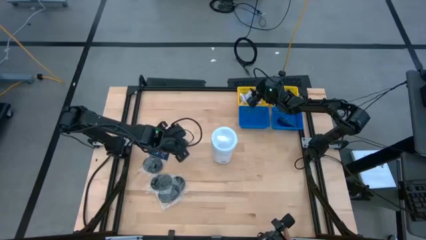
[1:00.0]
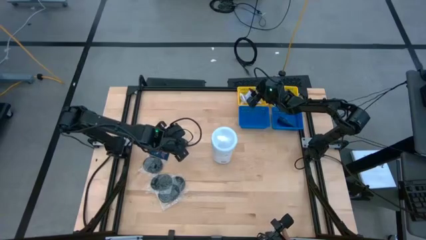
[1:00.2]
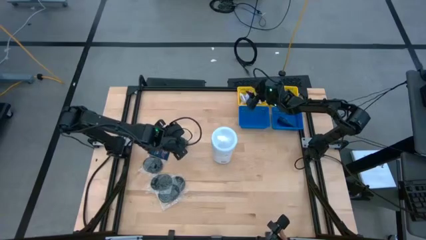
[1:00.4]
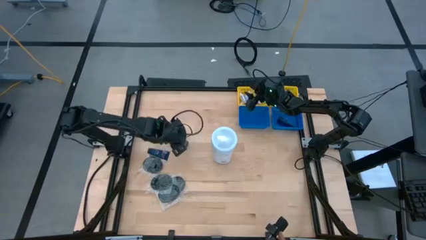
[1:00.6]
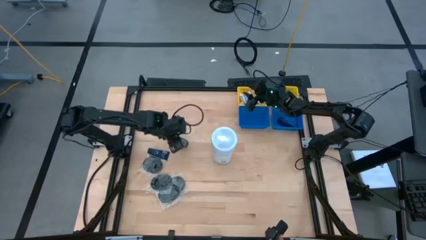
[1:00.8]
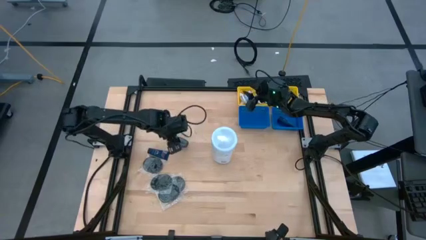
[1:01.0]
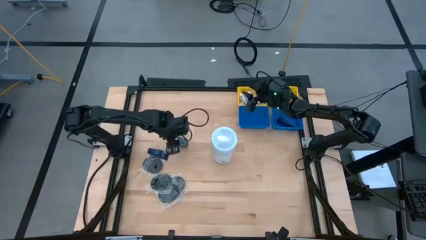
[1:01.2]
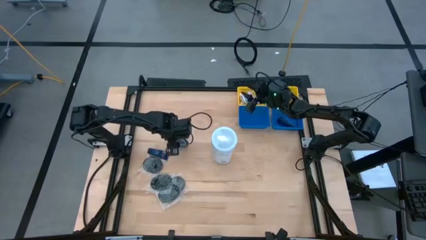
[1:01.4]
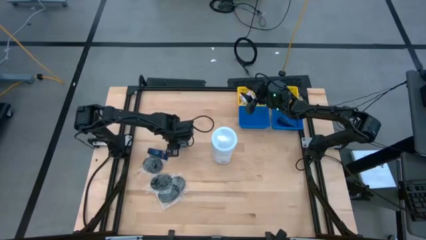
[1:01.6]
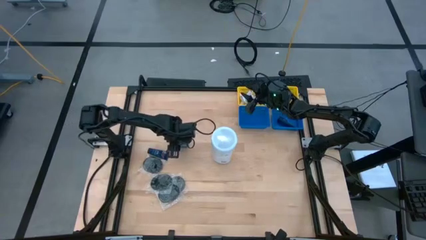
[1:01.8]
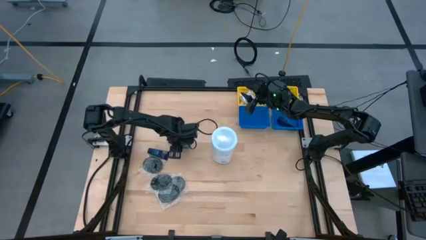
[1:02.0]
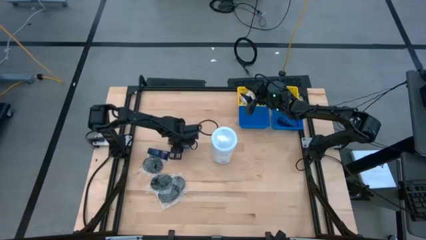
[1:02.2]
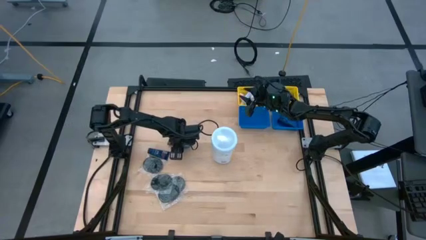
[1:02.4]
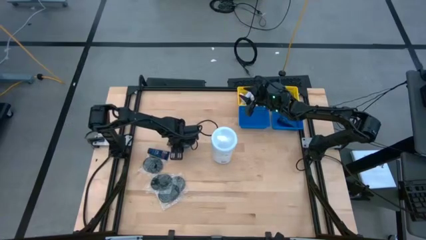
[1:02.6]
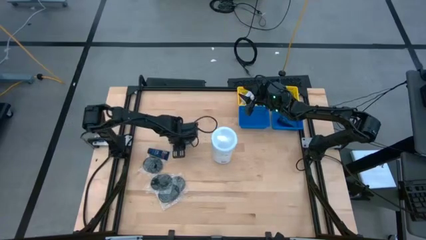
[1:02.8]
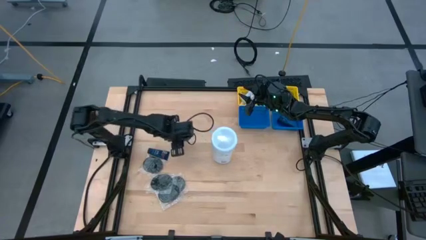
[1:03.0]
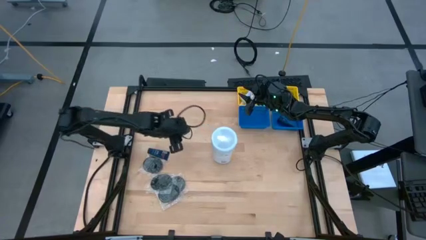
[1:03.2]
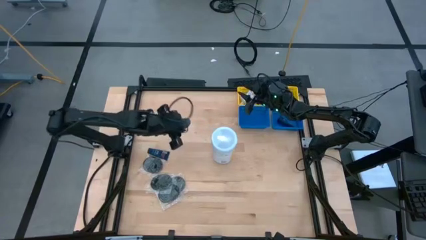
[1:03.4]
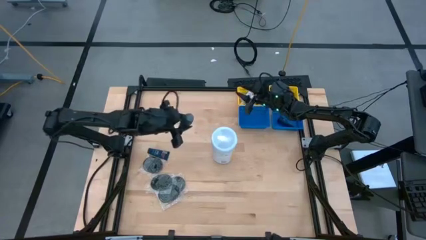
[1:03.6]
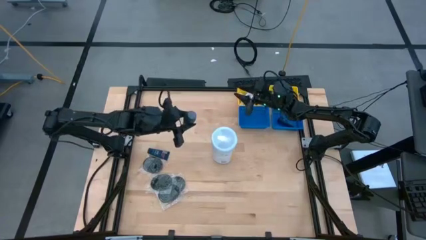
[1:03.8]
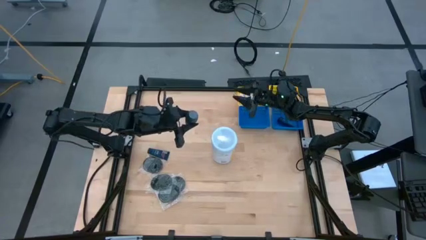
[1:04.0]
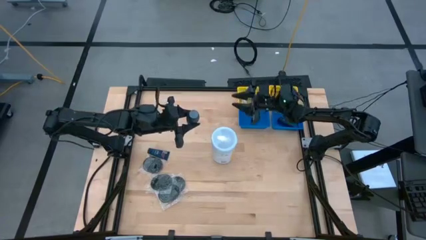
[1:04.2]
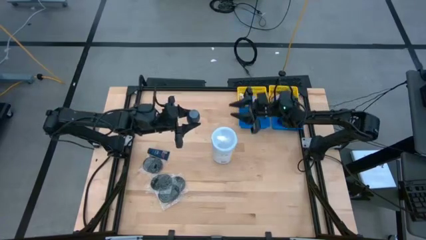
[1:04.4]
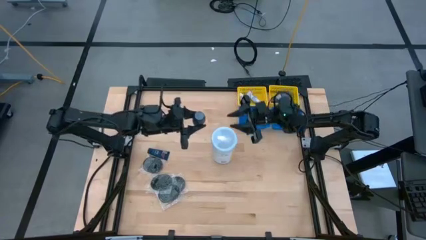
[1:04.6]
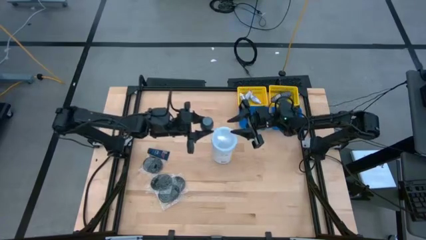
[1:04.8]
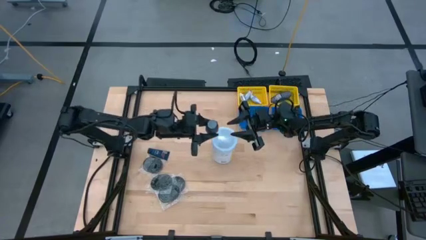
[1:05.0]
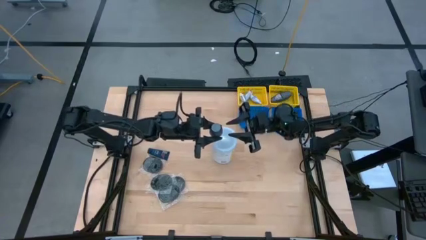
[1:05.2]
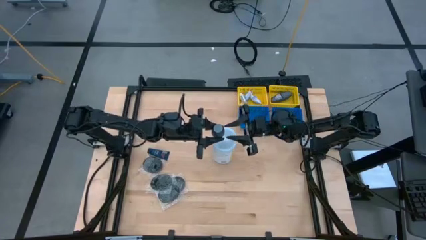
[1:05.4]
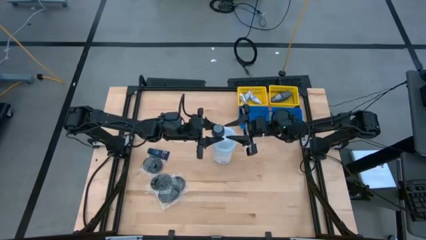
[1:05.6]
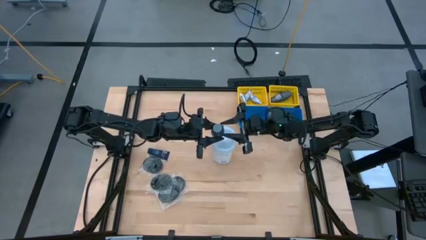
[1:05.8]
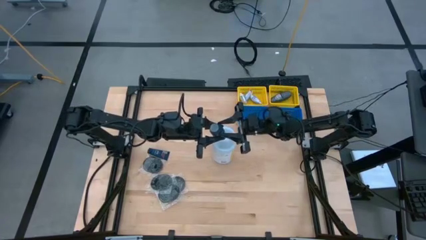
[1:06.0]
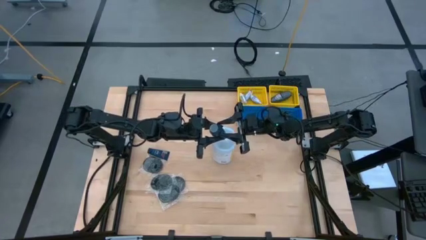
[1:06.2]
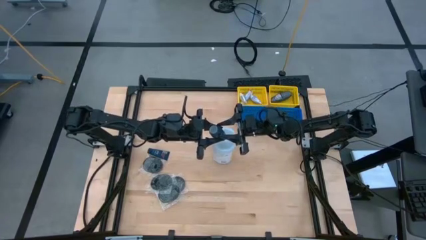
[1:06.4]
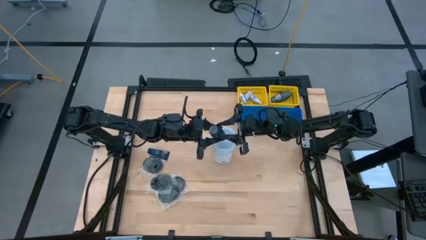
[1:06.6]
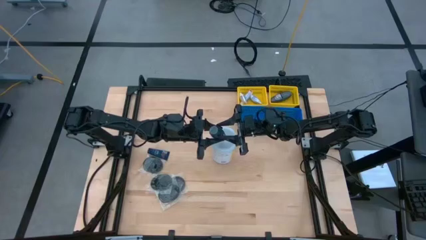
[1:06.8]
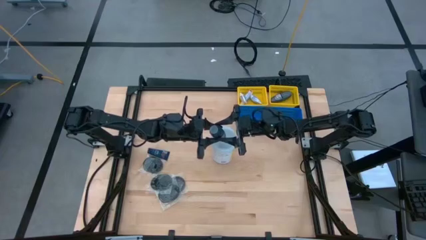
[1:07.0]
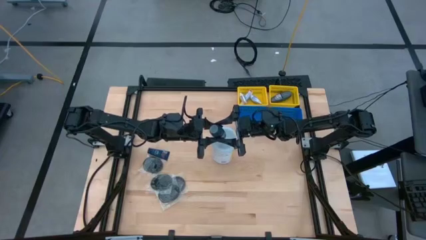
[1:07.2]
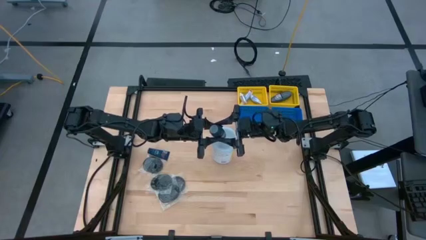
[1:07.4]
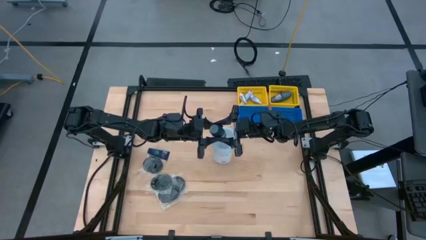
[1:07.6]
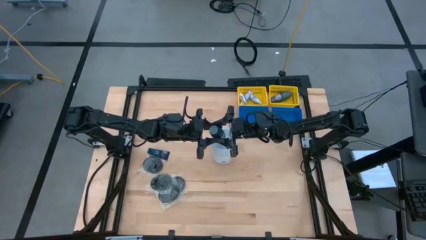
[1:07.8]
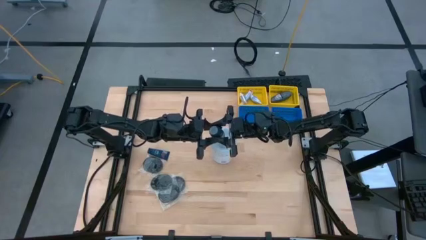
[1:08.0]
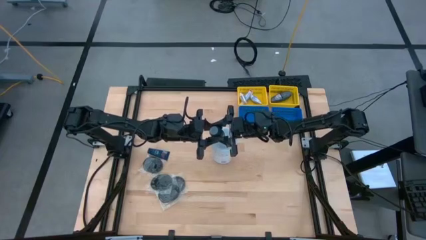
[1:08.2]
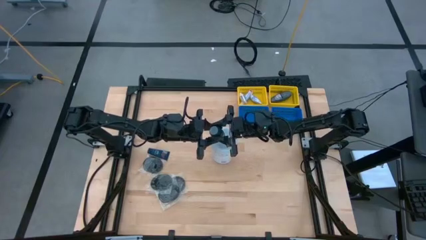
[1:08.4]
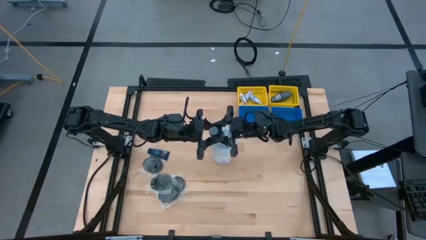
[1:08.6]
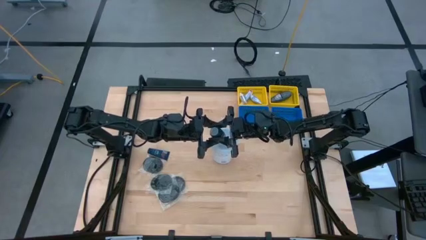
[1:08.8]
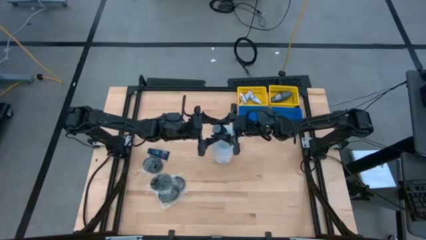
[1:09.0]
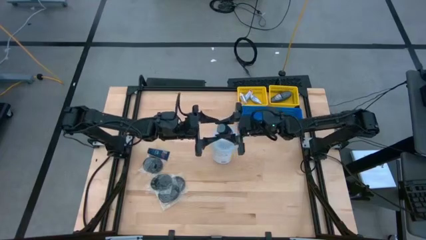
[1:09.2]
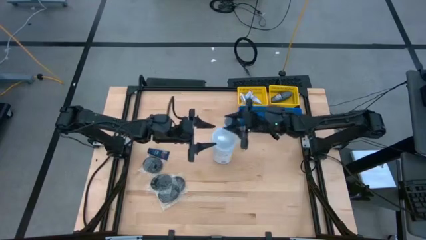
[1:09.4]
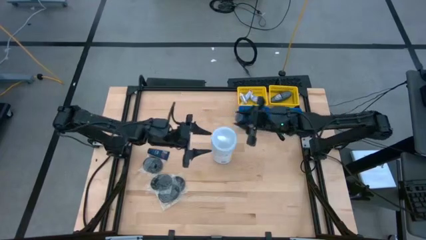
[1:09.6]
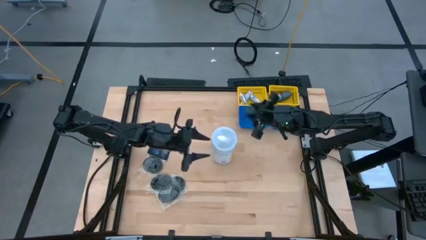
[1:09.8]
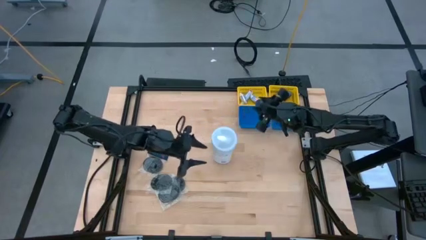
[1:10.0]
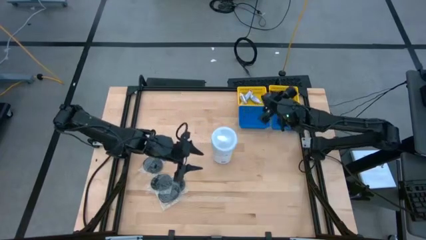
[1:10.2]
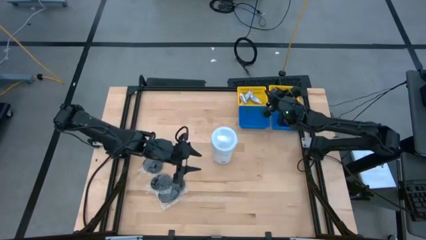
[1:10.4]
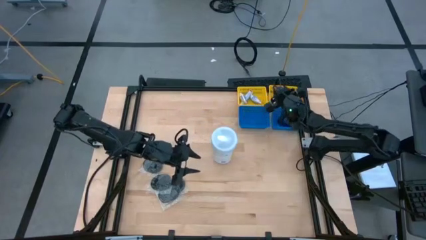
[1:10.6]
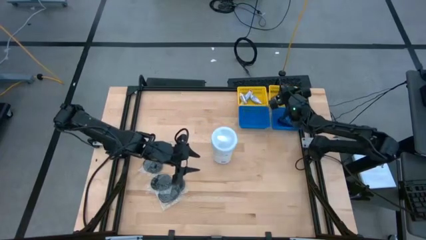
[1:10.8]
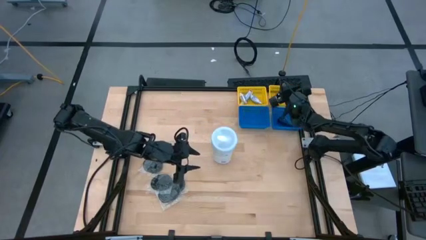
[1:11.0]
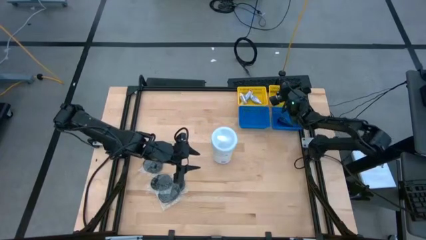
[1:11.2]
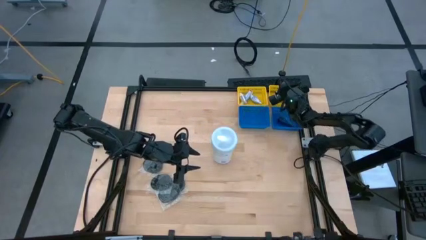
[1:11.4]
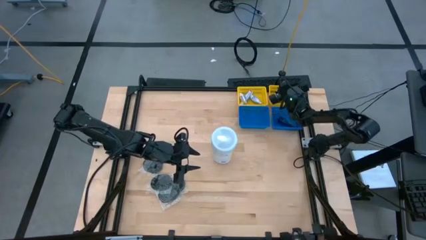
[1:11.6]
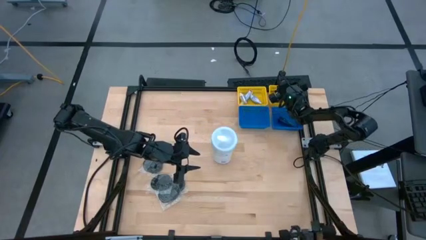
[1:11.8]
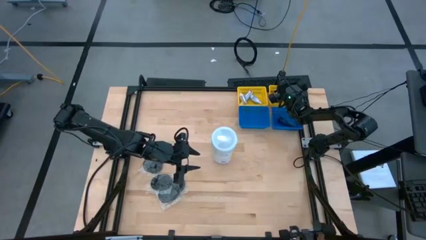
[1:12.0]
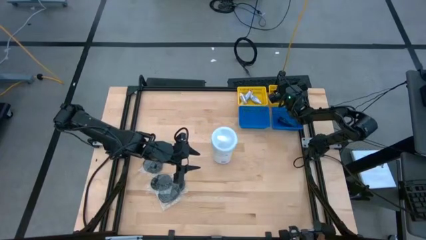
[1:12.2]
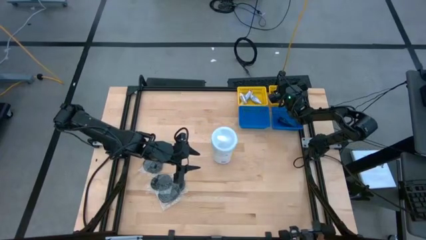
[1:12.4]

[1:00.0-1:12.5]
Task: Pick & Place Travel size toiletries
Put the black deodorant into the right yellow bin

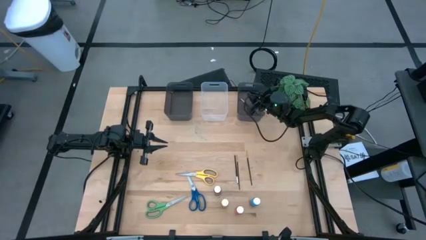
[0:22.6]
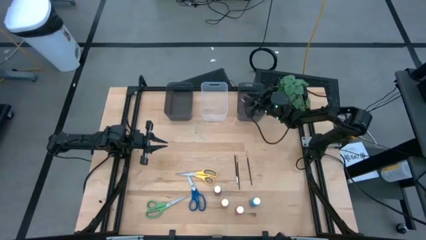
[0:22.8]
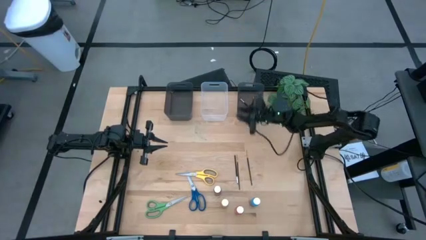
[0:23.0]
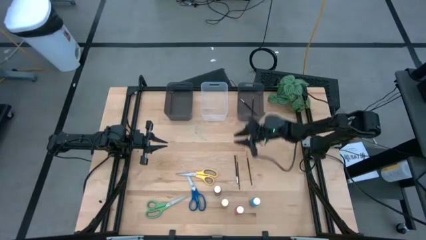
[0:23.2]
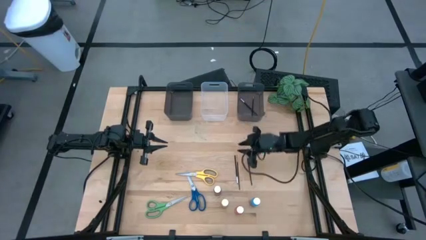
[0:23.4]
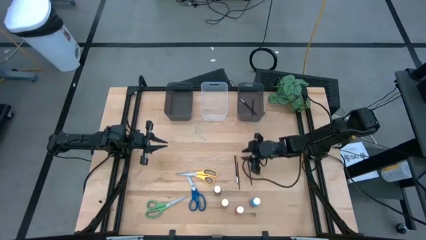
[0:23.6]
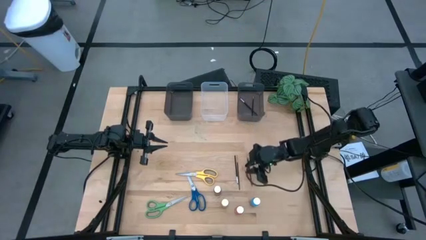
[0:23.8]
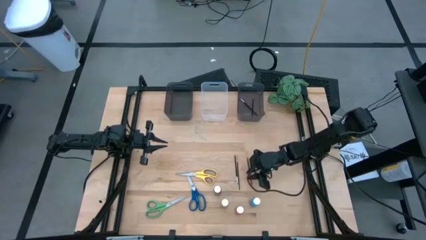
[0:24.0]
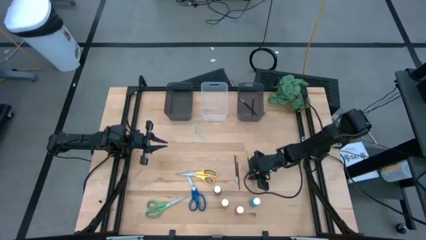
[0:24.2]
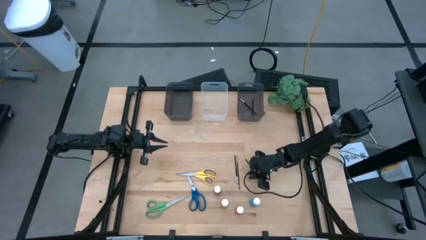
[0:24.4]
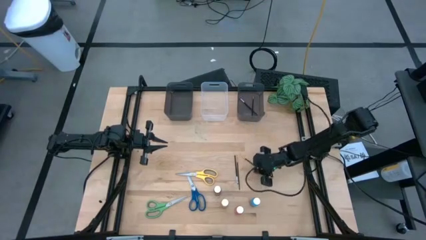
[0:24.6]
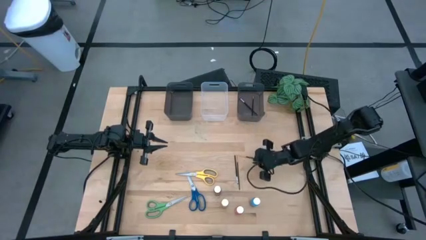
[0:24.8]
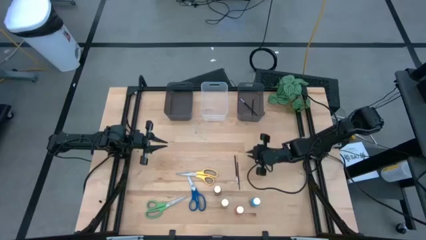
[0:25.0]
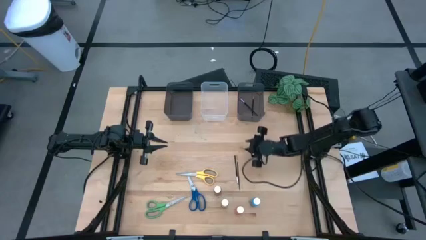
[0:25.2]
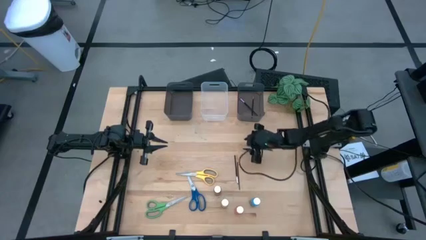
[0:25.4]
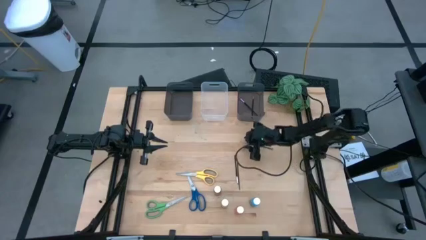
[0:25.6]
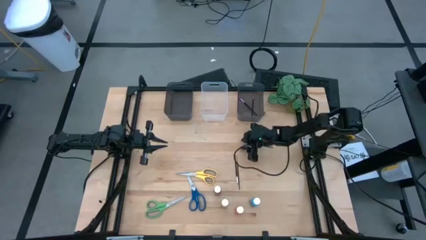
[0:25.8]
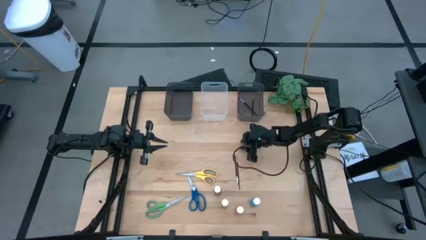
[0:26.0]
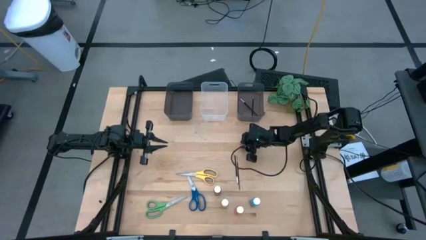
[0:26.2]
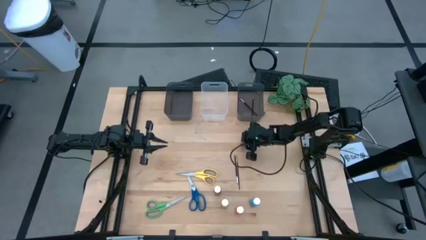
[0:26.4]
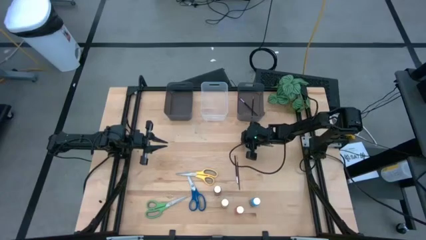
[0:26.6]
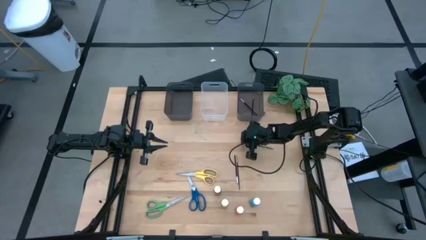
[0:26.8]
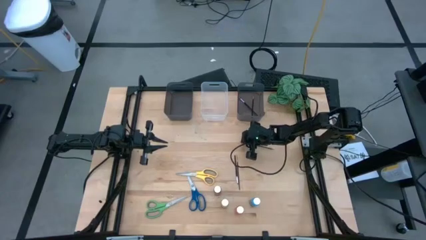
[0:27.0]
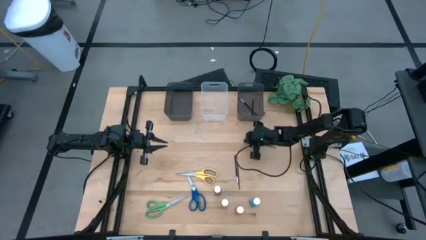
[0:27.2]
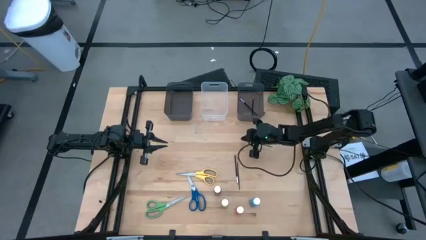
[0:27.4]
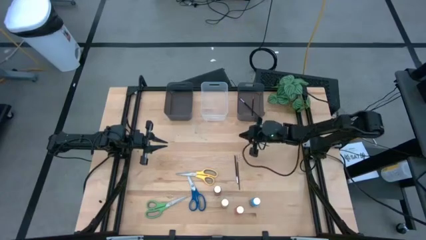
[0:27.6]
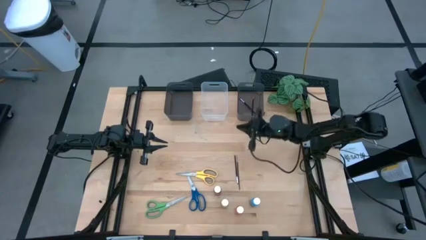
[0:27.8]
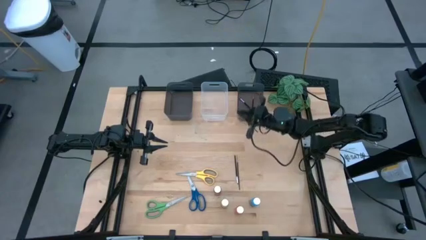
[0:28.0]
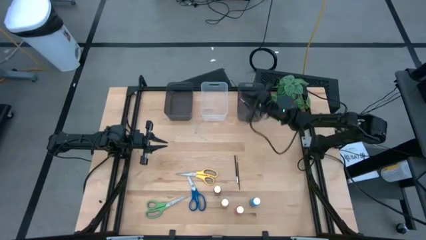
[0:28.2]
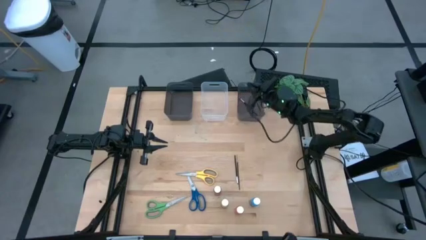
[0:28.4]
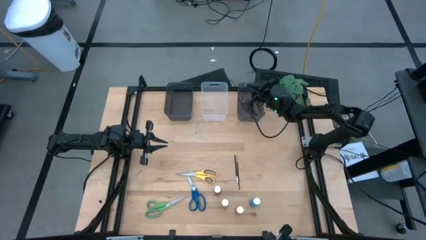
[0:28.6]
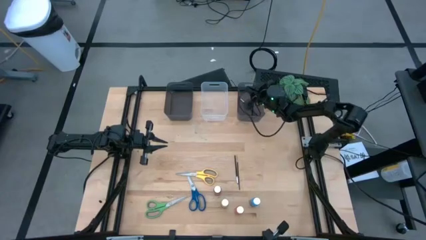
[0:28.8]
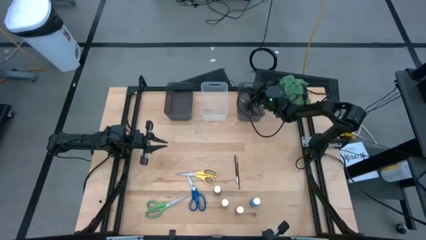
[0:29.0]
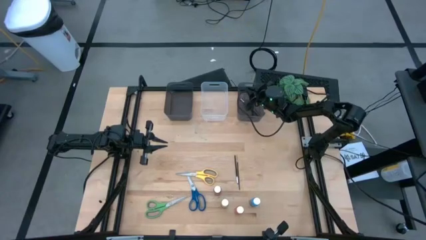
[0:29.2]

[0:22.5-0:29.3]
Task: Pick & Place Paint Supplies
Put the black paintbrush into the right black bin
